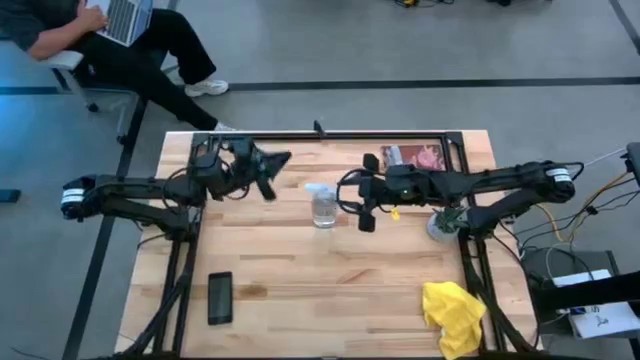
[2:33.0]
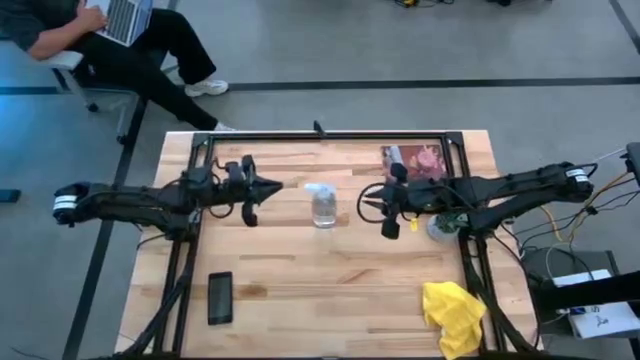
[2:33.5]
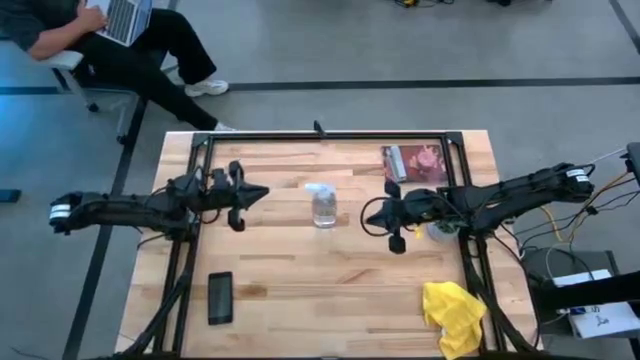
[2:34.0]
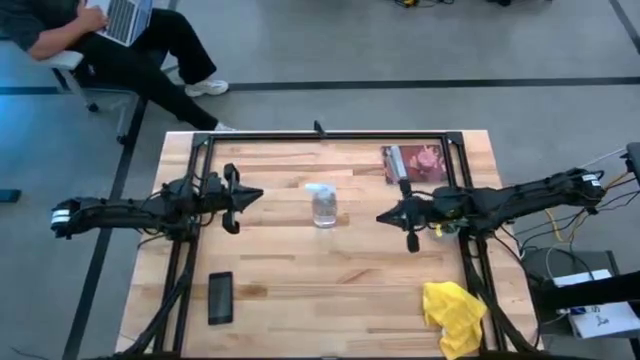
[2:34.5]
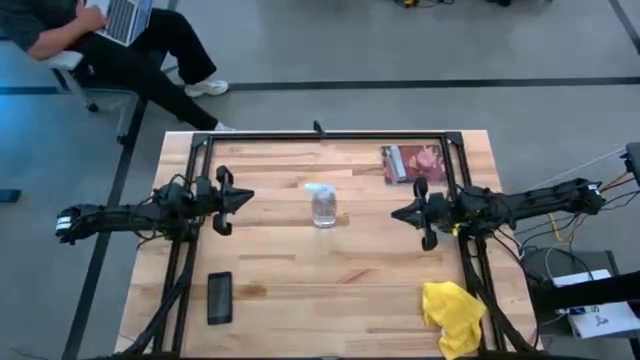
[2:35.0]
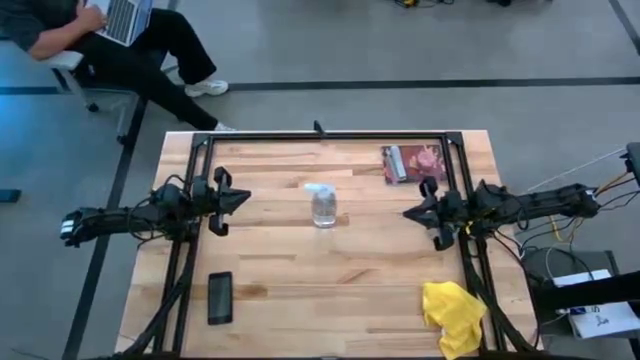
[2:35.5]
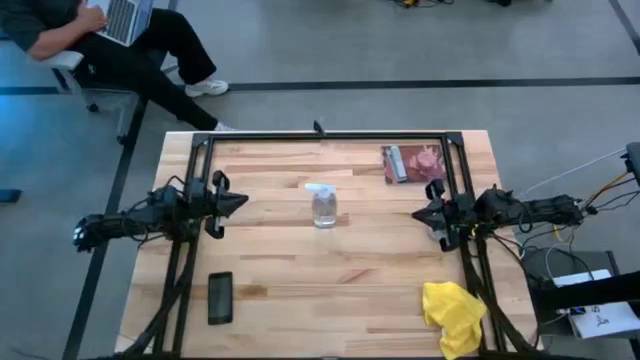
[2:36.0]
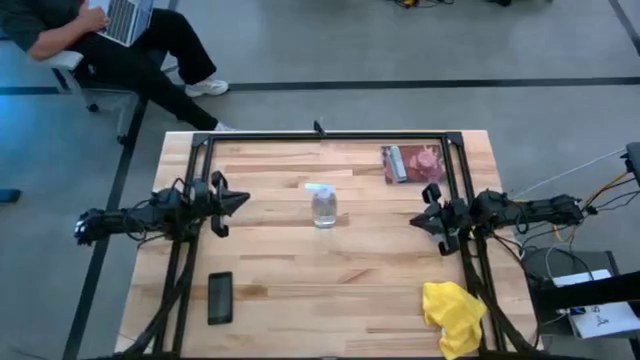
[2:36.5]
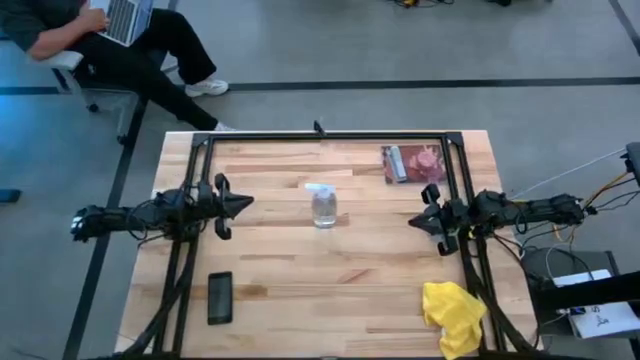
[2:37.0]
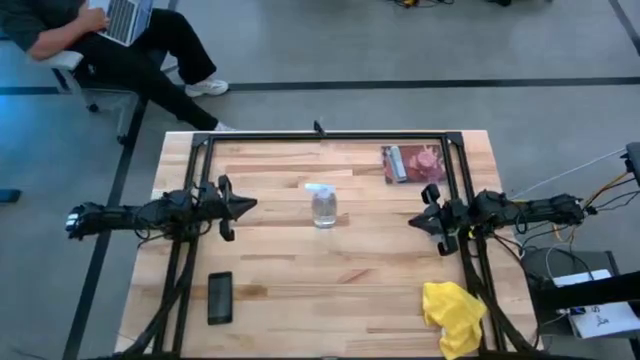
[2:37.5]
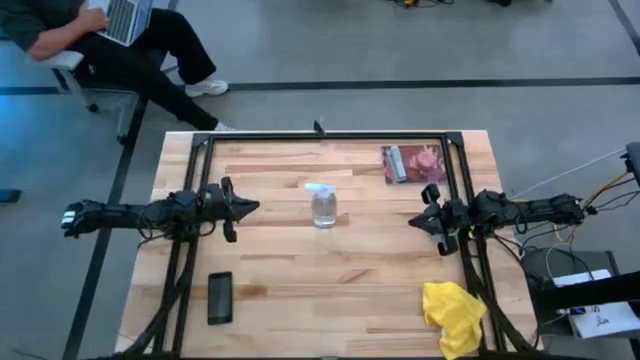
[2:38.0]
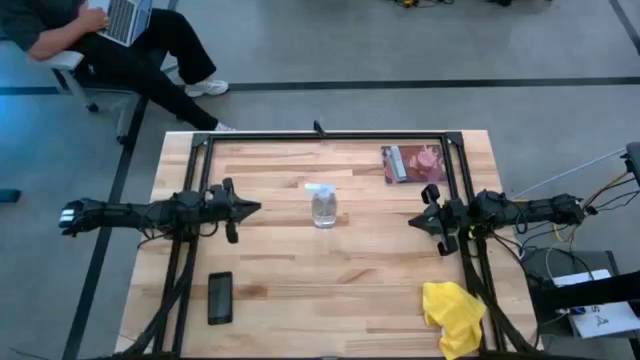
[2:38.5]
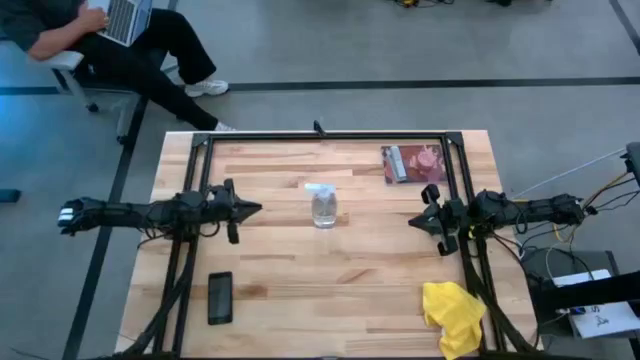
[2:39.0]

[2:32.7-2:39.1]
Task: Apply microfiber cloth
Return to Home Position

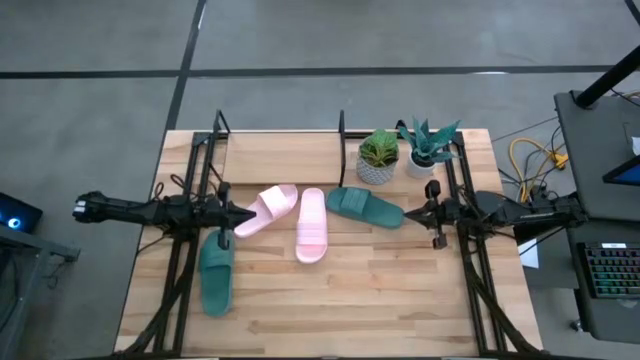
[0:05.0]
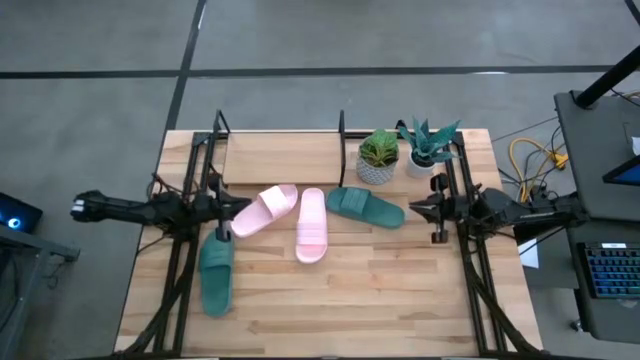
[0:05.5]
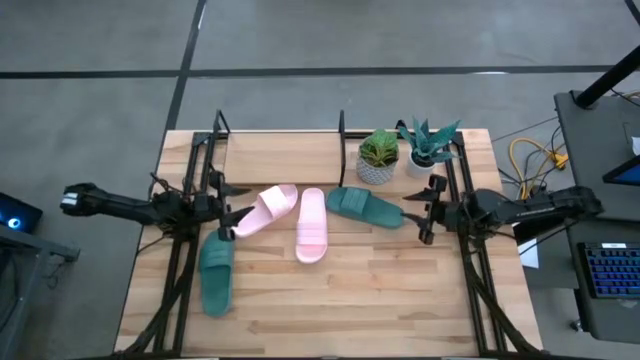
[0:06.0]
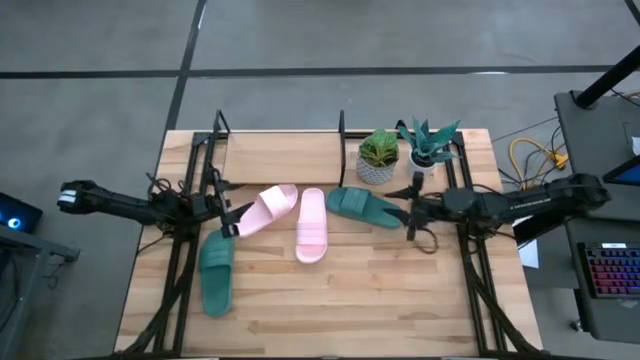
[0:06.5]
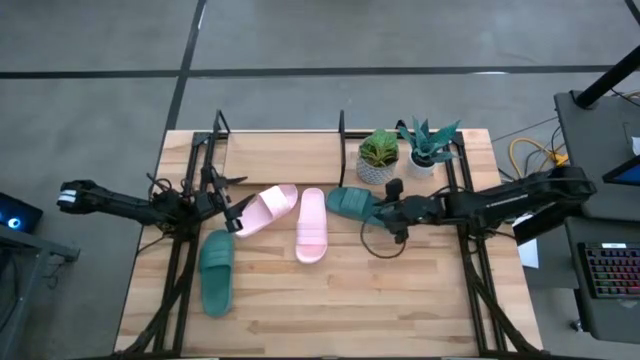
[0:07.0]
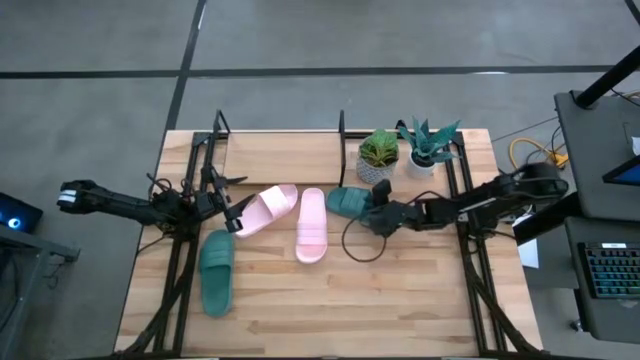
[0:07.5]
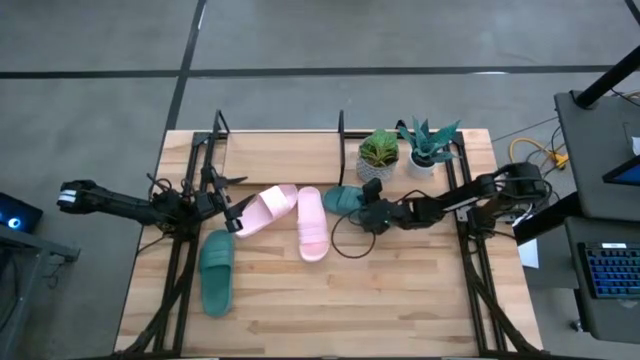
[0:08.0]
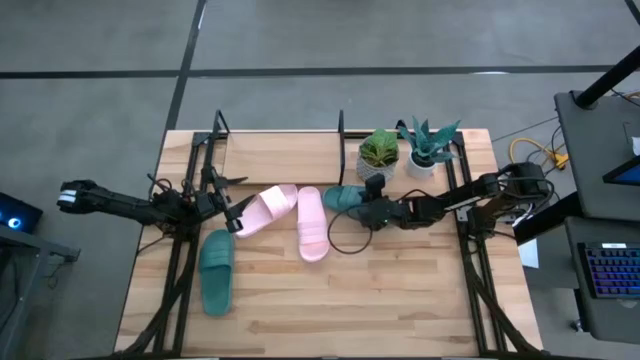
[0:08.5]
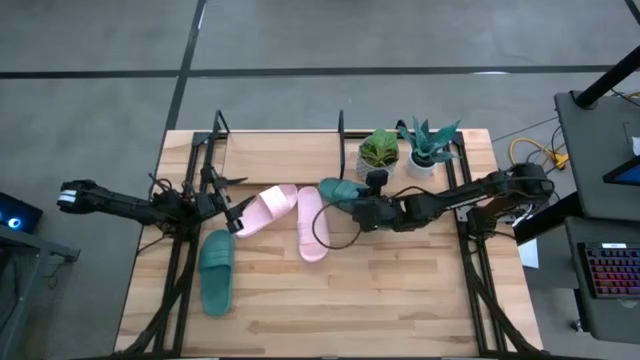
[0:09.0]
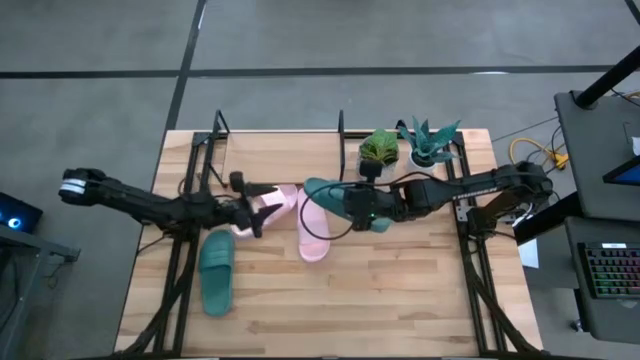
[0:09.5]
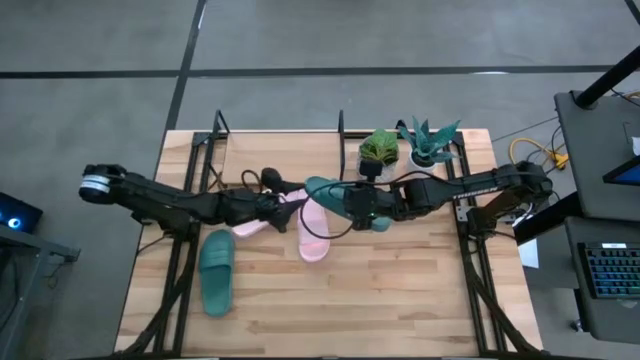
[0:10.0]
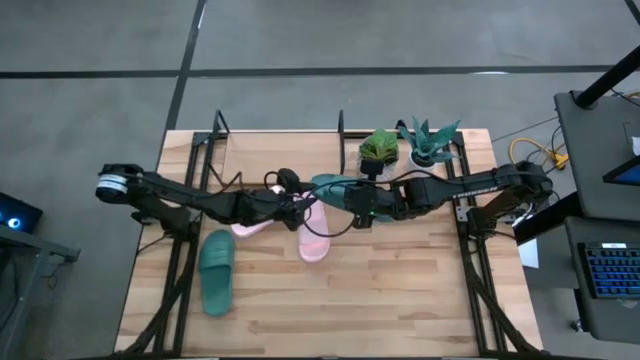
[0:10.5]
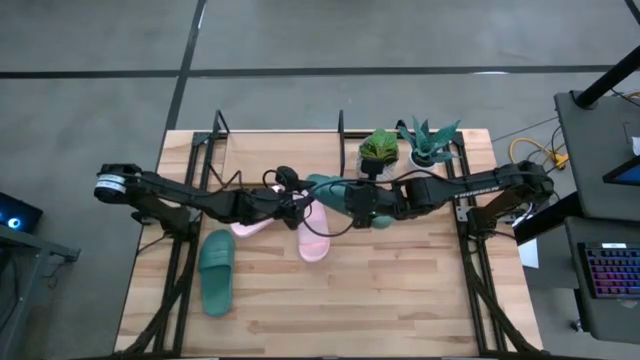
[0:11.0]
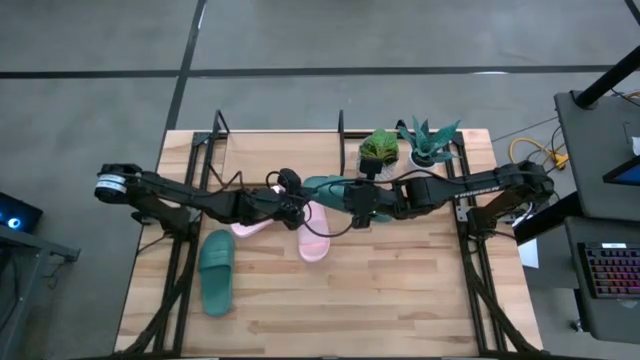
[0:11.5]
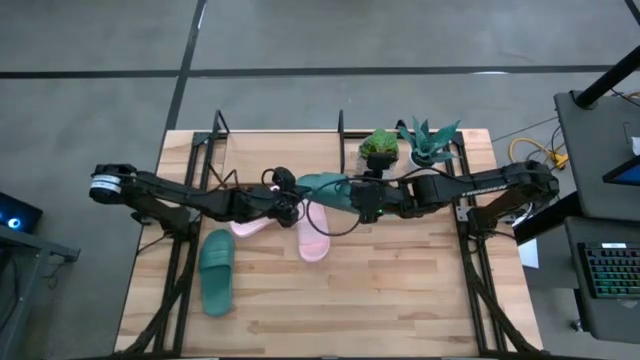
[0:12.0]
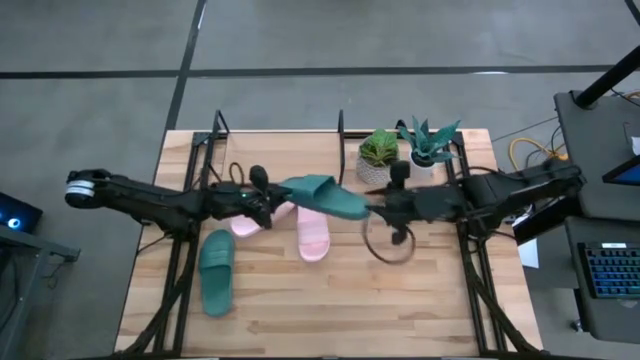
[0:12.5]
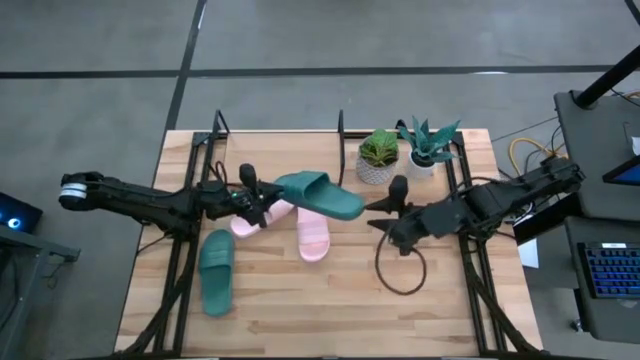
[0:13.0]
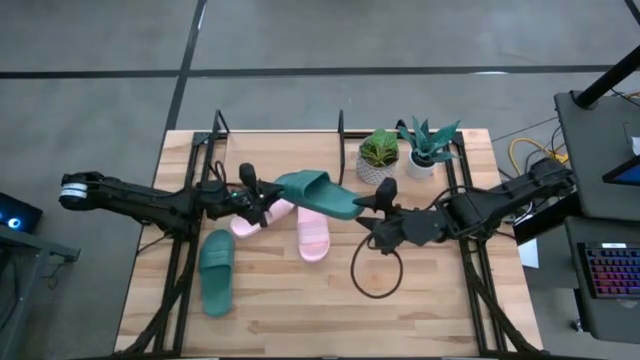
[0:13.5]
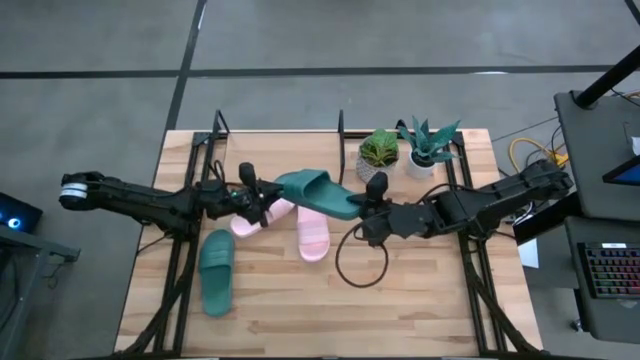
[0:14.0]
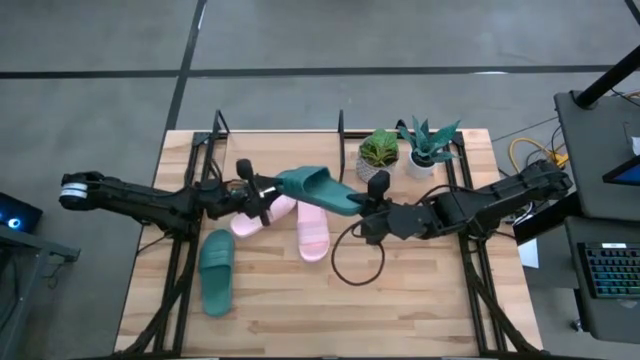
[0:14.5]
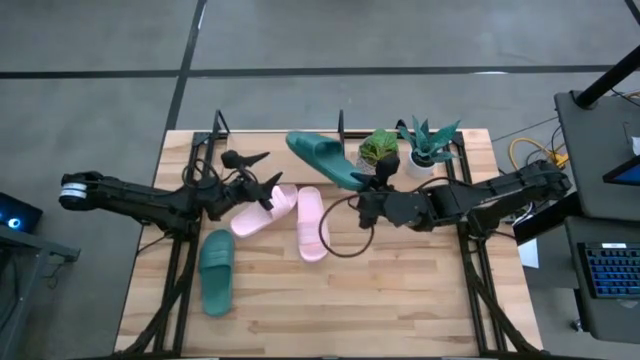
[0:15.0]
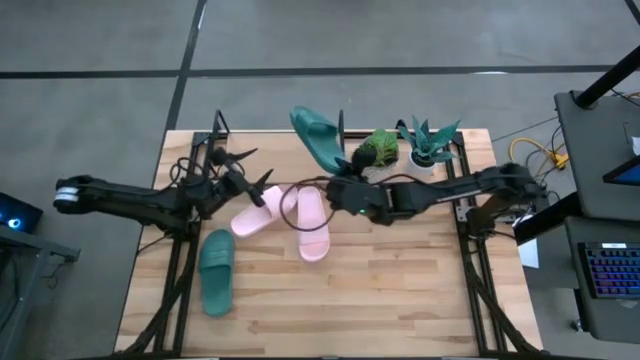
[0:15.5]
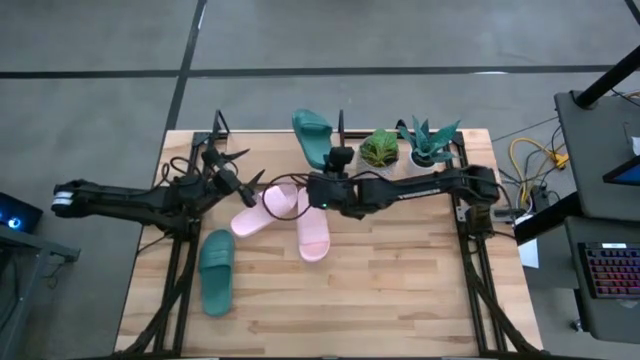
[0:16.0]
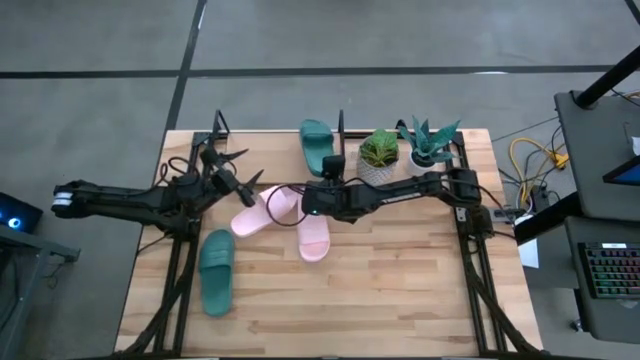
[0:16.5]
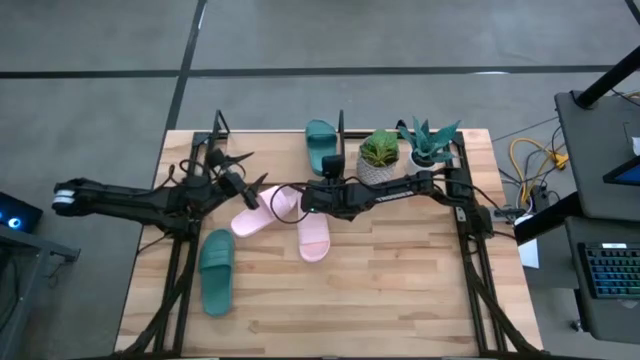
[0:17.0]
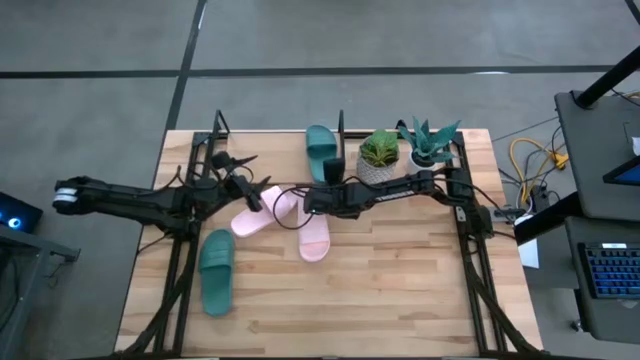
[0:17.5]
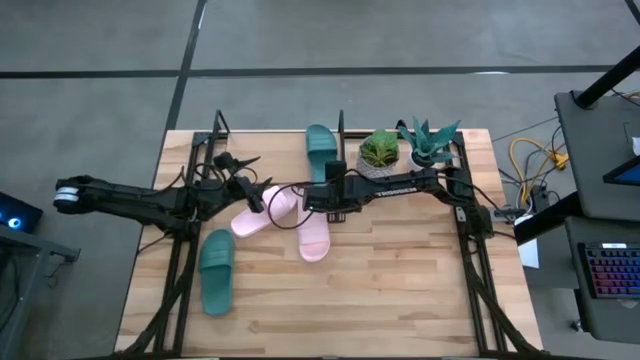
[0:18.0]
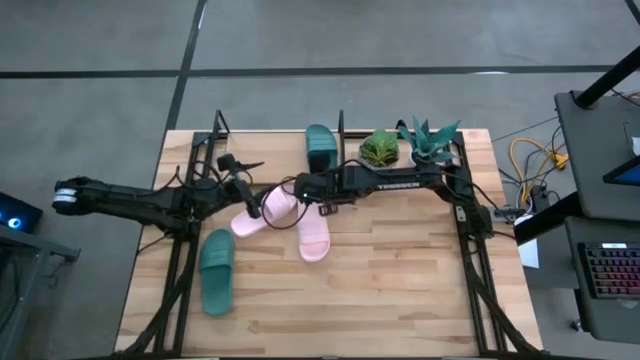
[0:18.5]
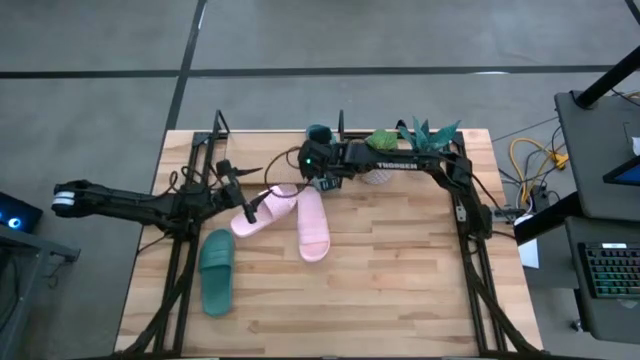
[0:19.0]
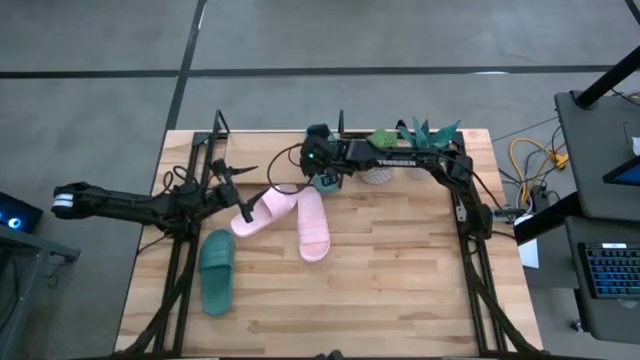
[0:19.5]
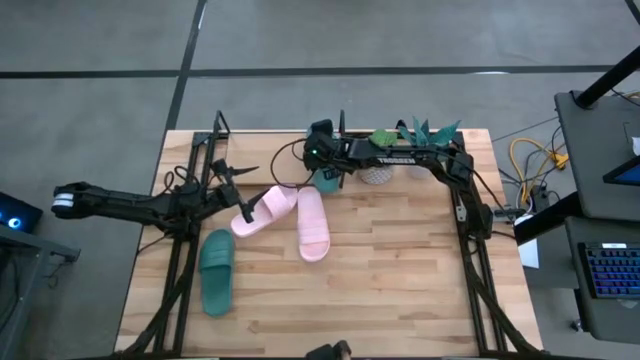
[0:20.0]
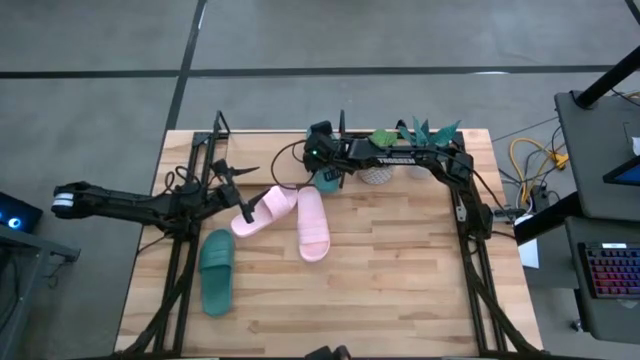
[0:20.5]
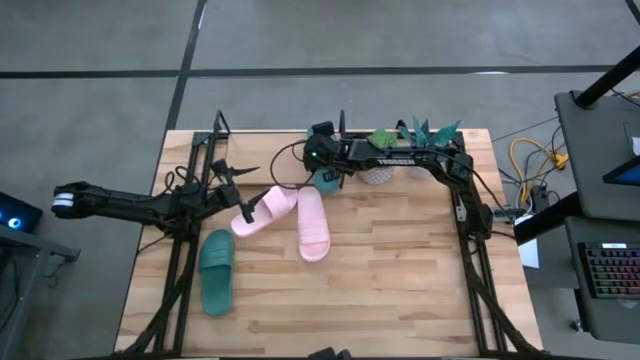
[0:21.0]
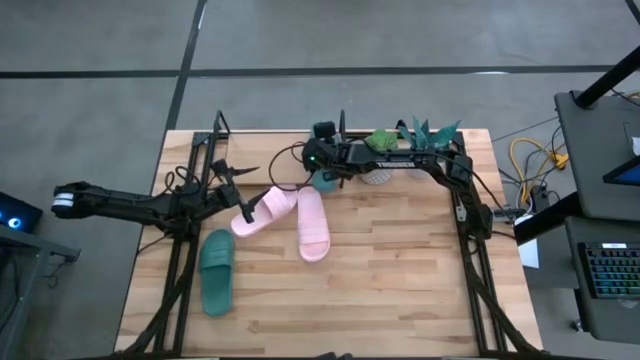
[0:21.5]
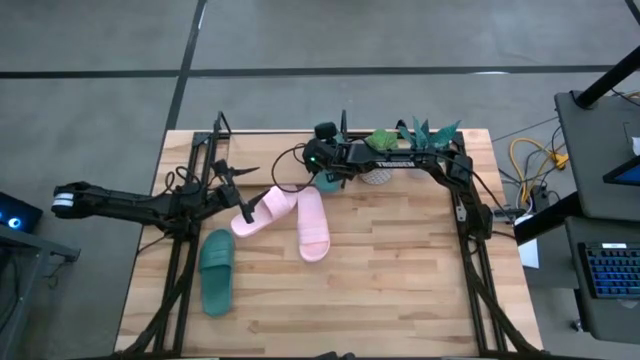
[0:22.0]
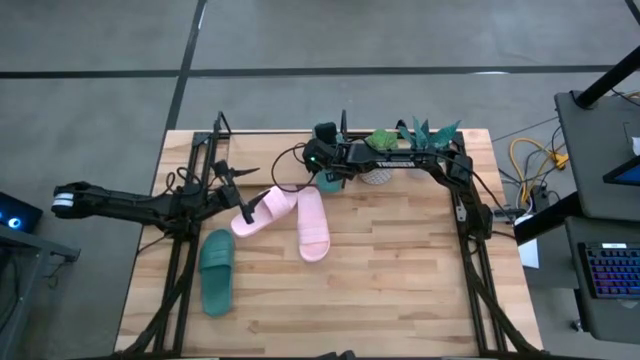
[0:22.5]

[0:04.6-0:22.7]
Task: Pick and place slides into the shelf
Put the right green slide into the shelf
